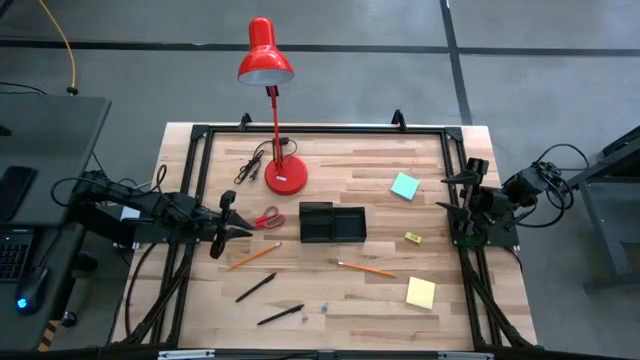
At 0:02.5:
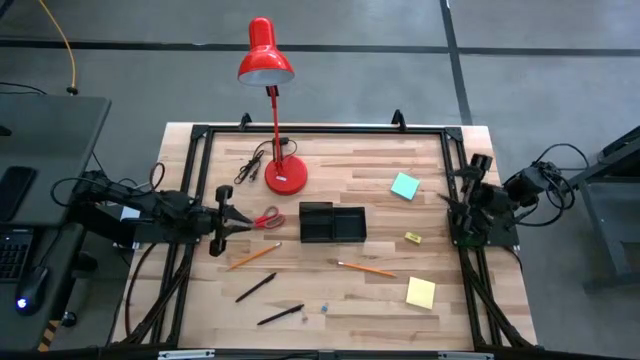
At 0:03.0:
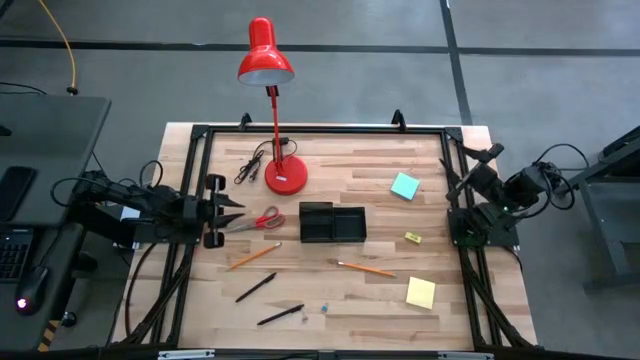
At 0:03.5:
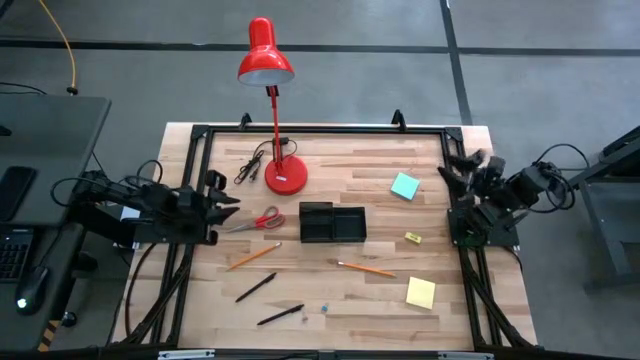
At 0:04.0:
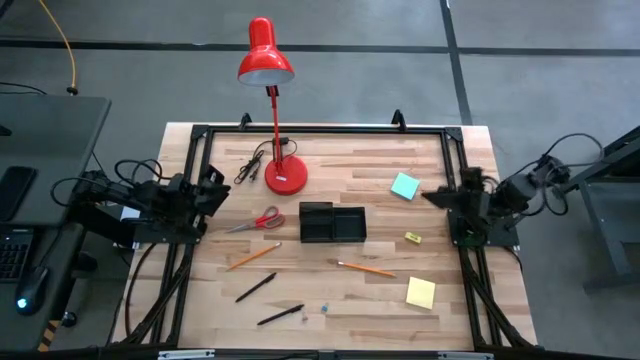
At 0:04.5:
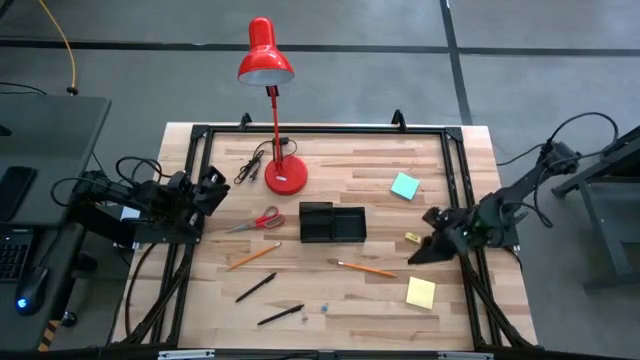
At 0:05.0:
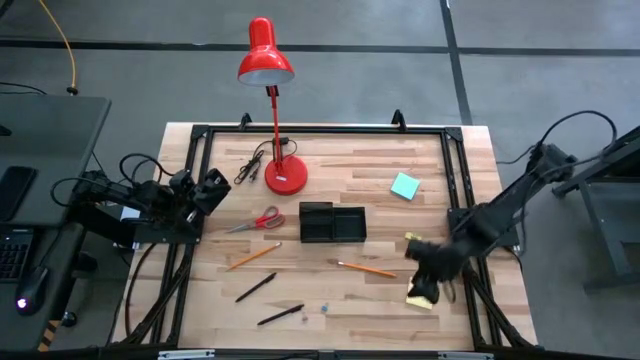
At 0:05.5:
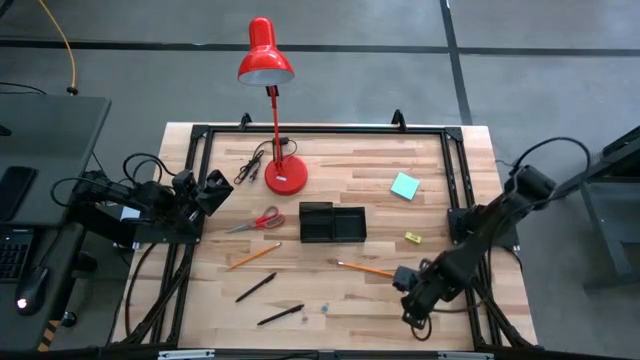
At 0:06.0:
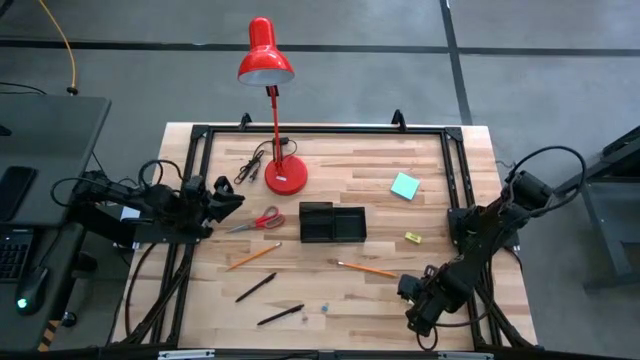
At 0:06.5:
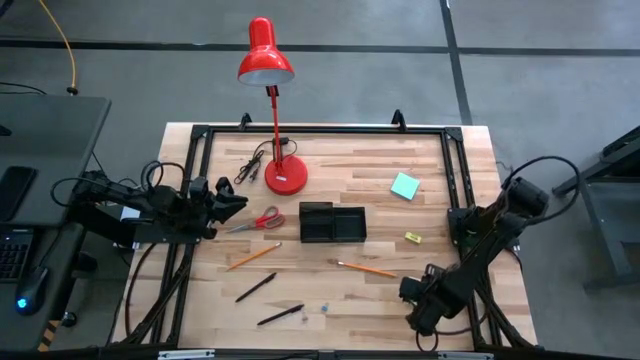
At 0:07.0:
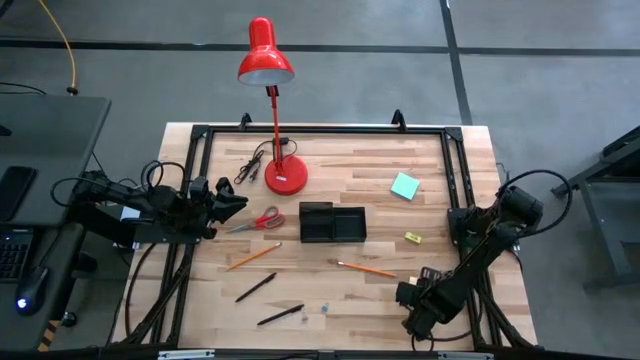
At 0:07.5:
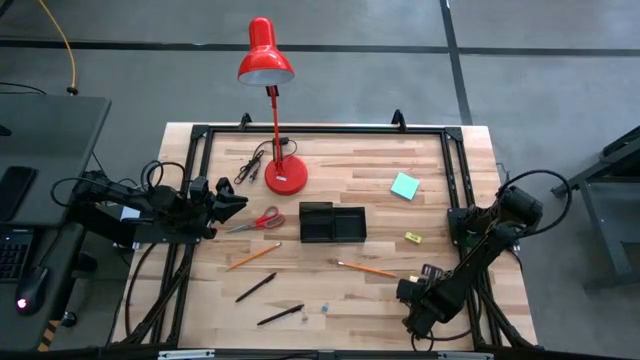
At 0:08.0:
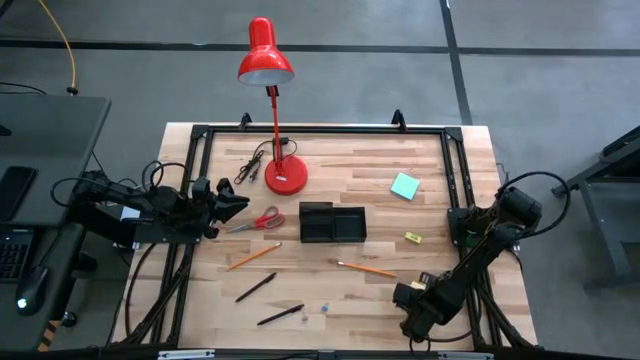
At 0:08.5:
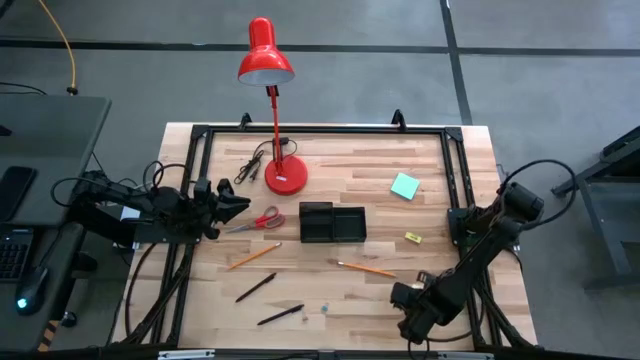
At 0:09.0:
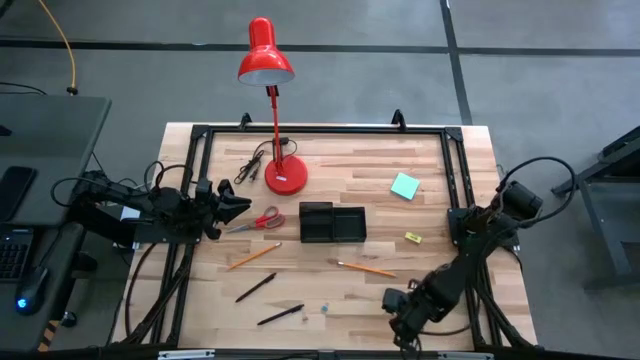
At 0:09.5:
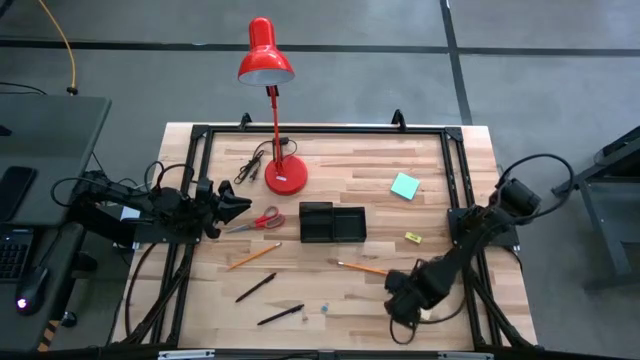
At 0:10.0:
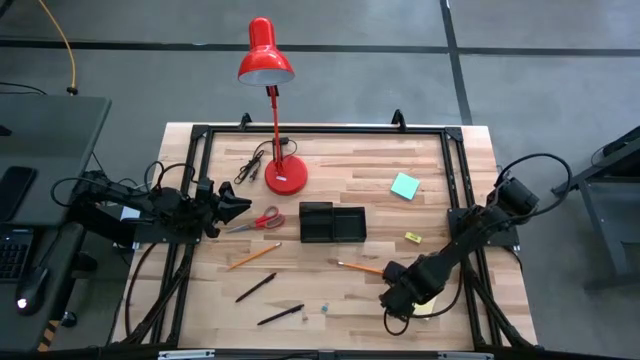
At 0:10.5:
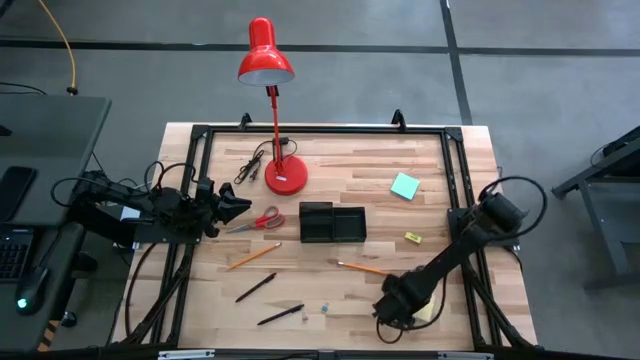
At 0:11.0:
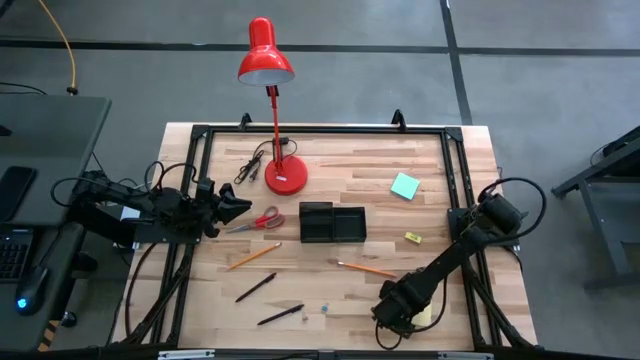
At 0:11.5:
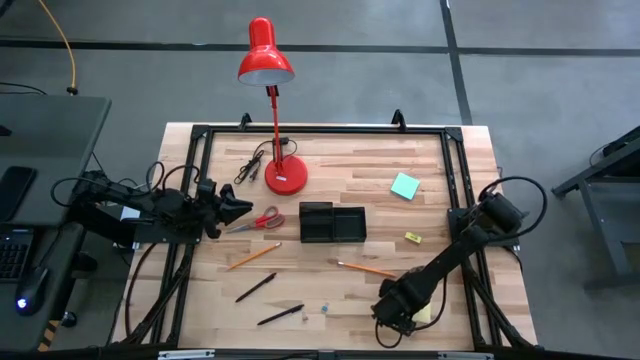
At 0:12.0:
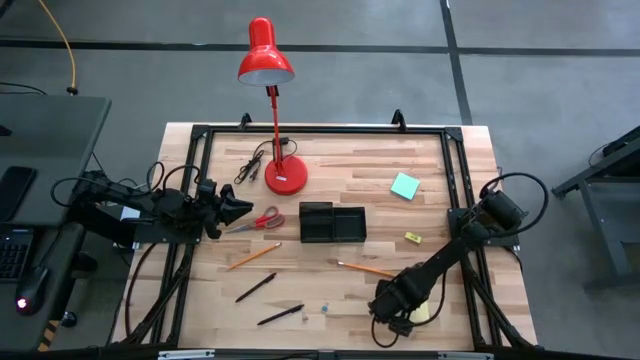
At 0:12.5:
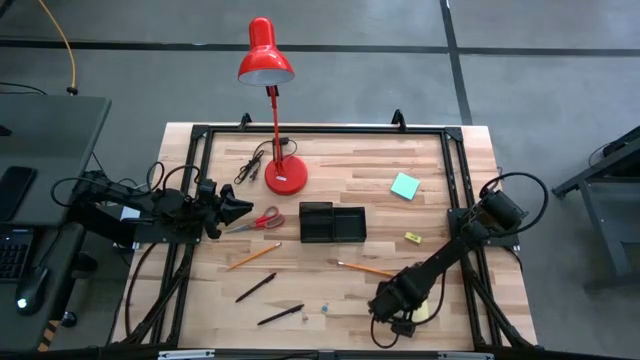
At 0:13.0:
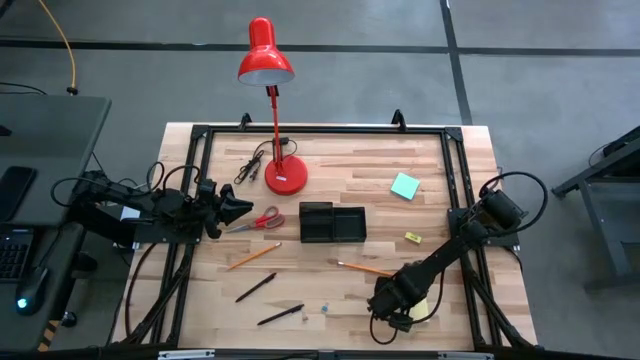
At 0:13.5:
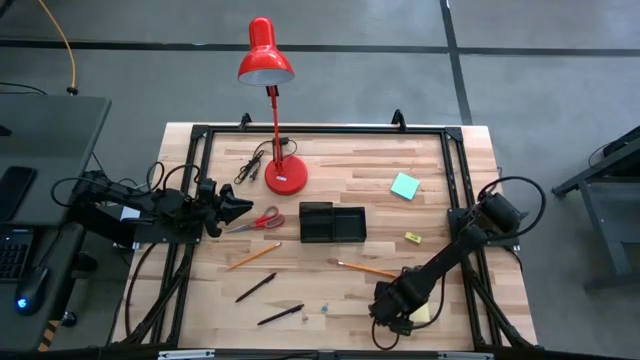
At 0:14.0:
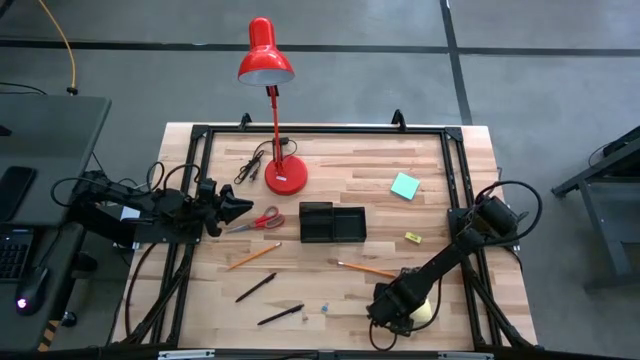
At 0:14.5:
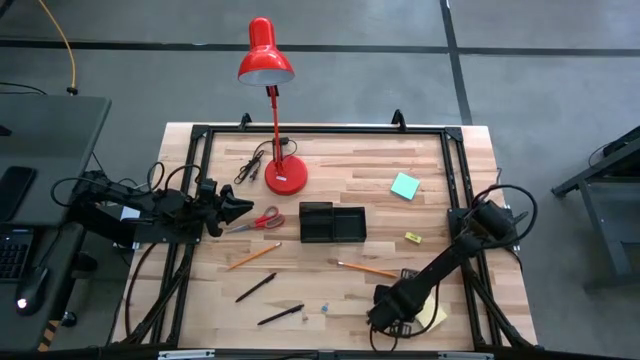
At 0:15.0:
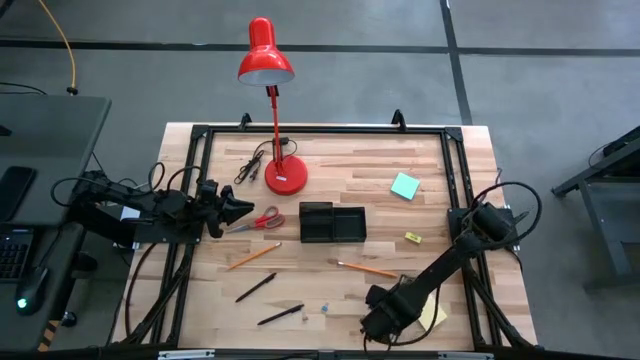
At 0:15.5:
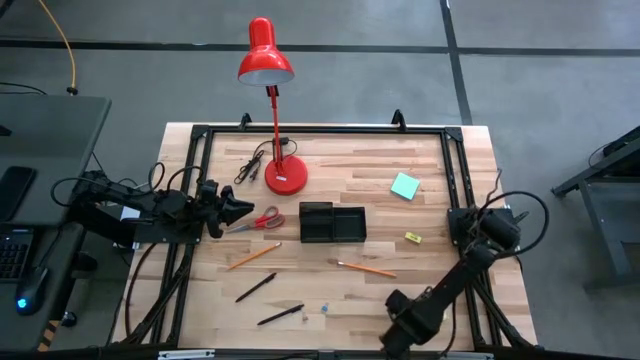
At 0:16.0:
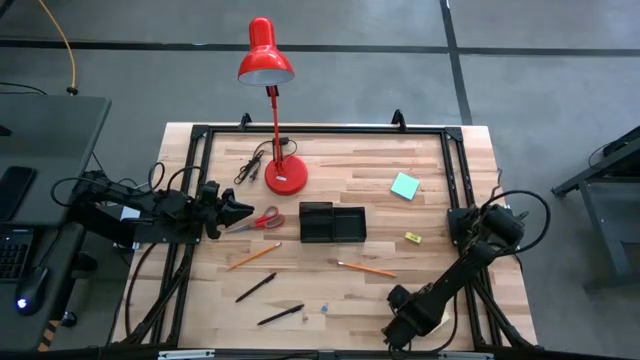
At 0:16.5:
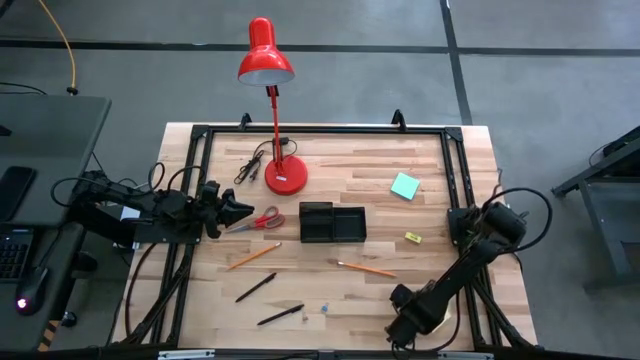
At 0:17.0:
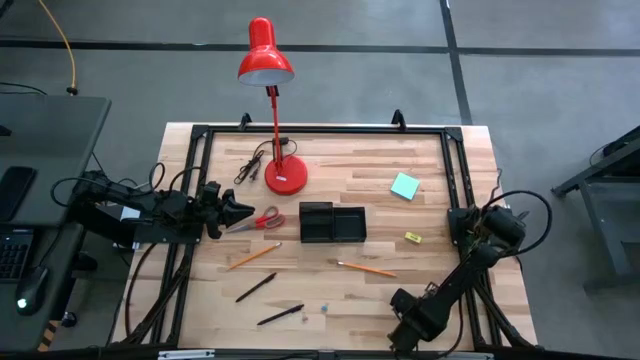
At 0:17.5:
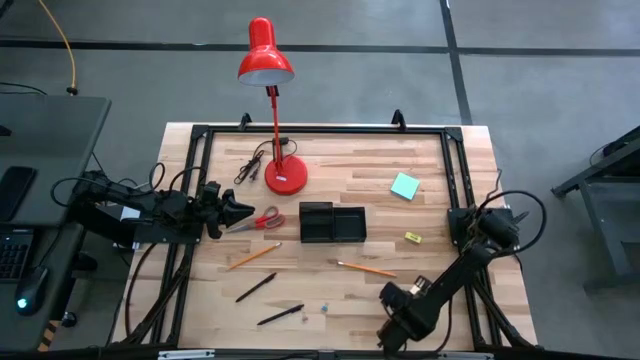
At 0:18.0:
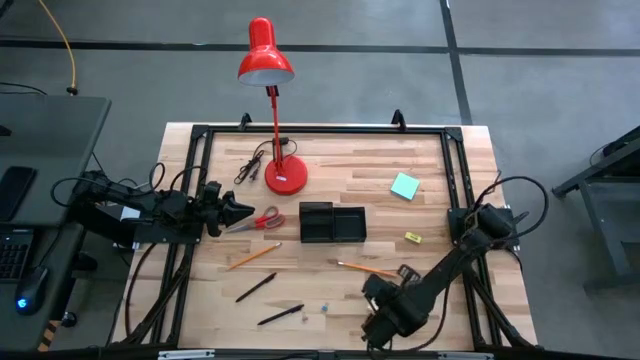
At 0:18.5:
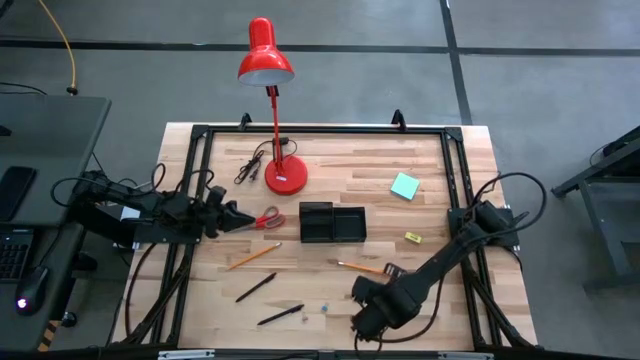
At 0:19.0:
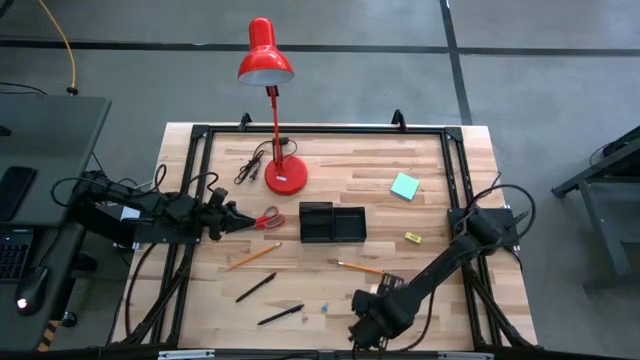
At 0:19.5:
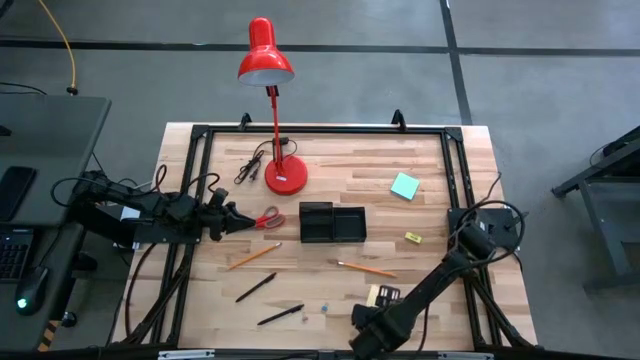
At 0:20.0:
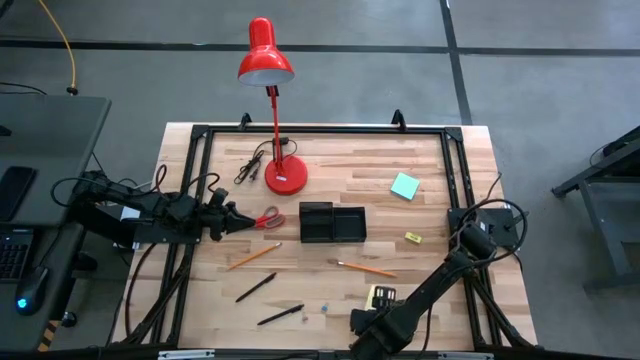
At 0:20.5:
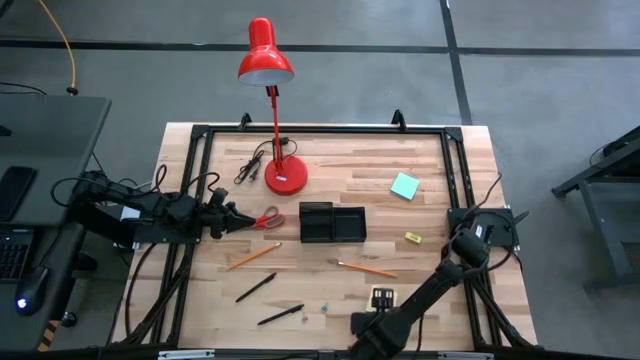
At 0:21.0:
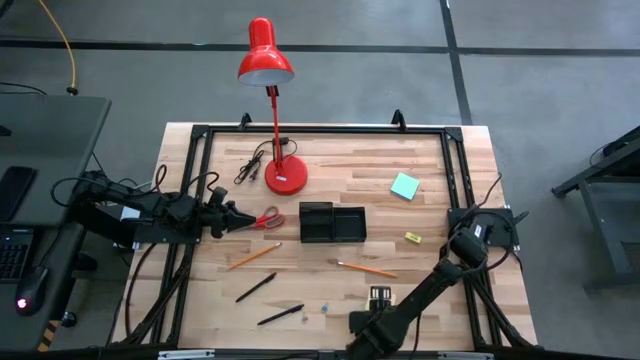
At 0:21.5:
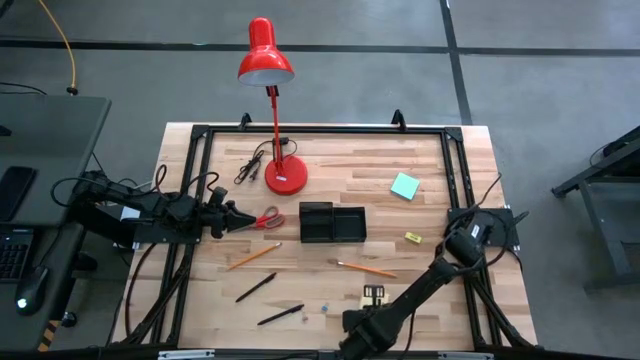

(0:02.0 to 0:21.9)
Task: Pick and place office supplies into organizer
Put the yellow sticky notes into the black desk organizer
